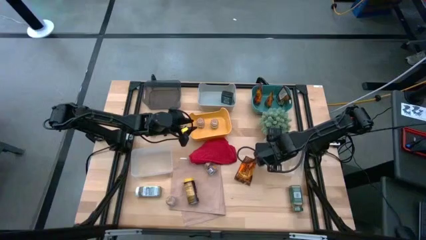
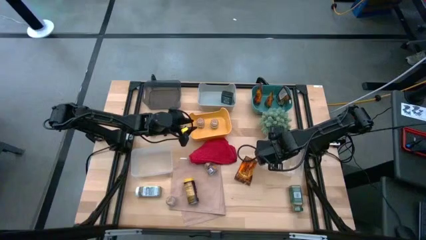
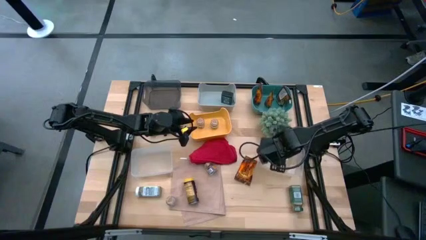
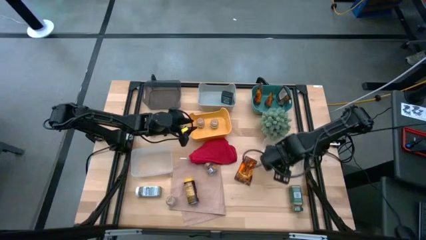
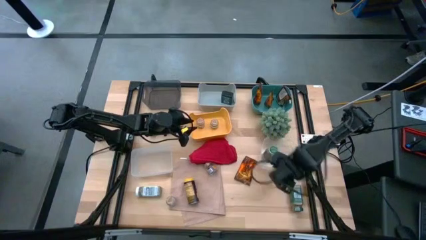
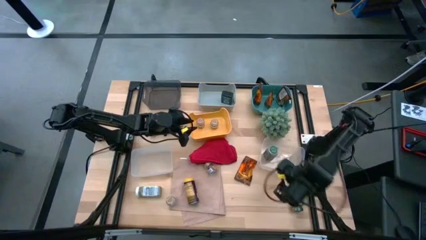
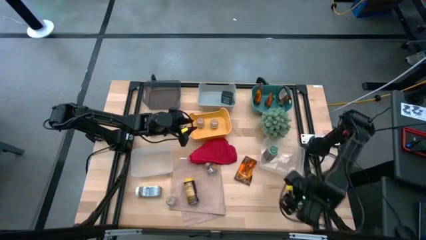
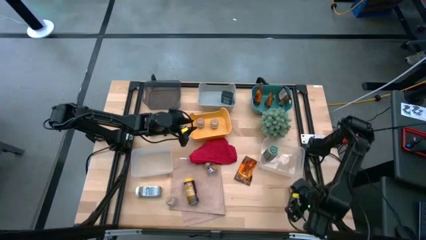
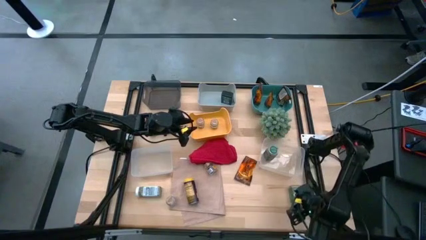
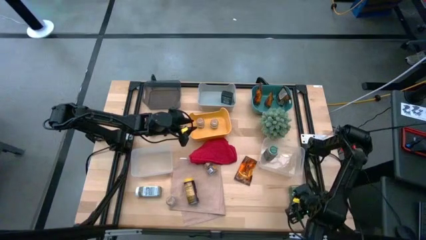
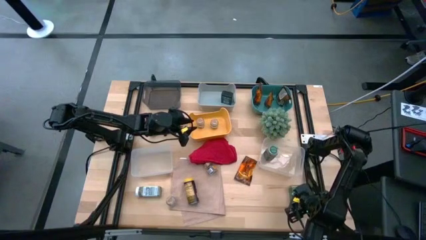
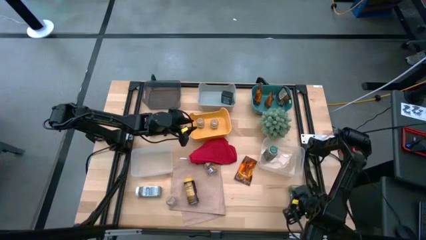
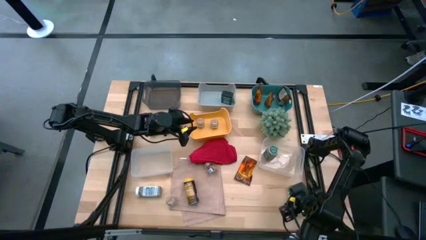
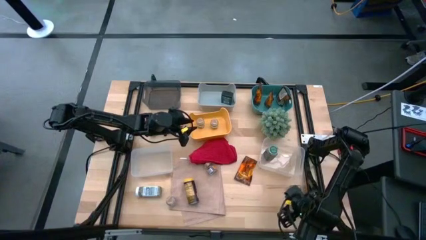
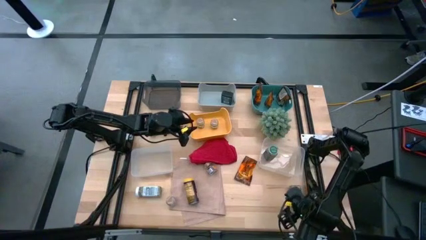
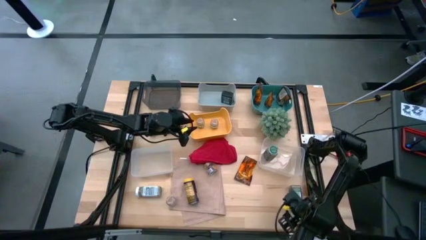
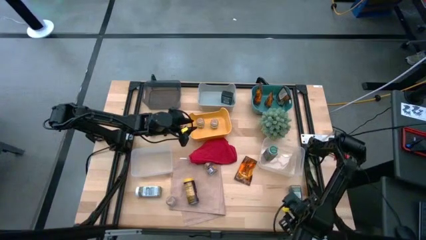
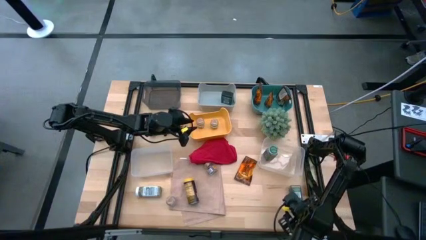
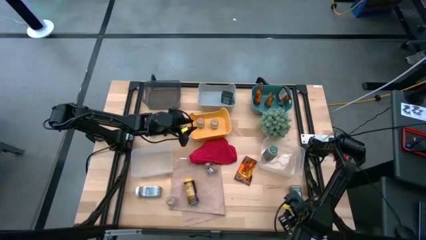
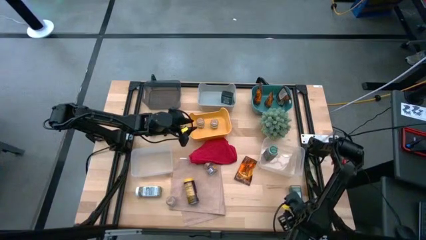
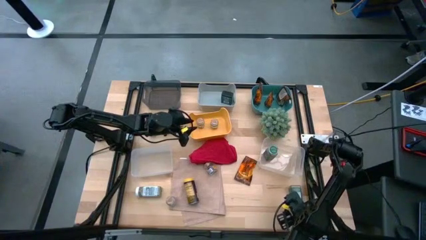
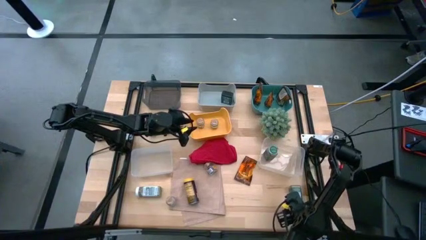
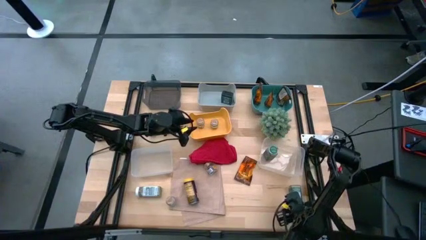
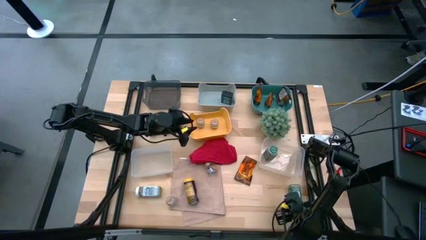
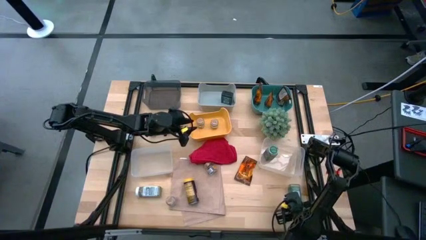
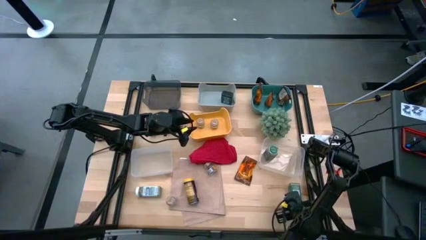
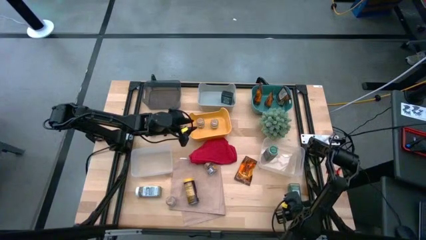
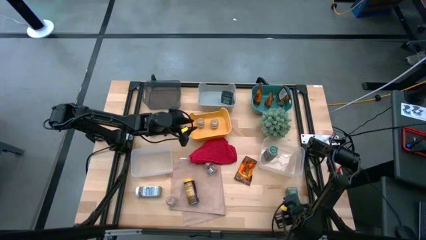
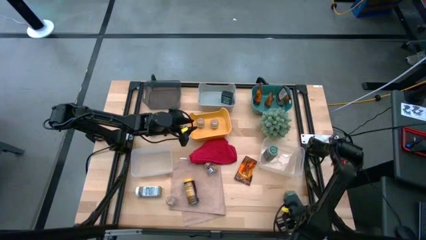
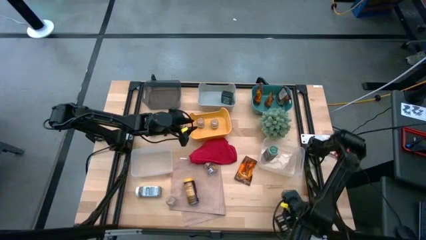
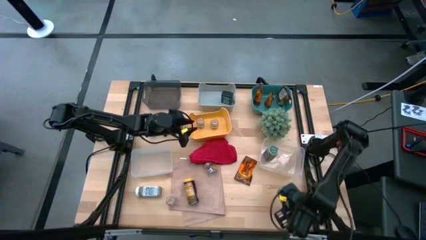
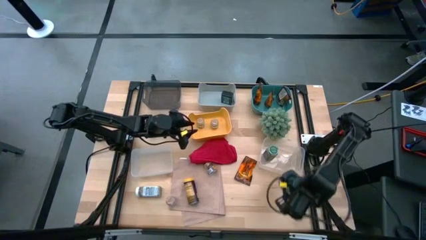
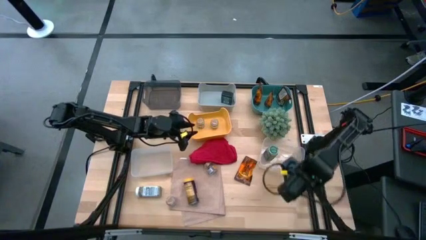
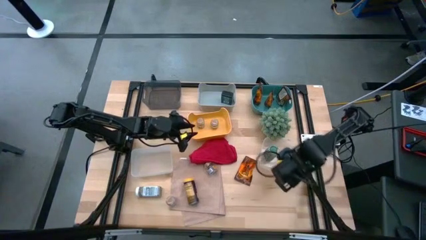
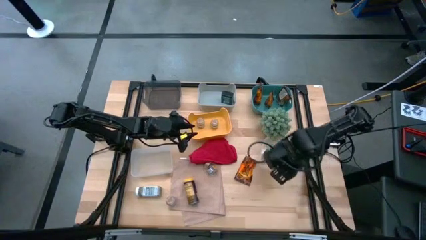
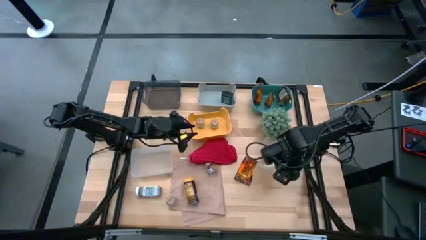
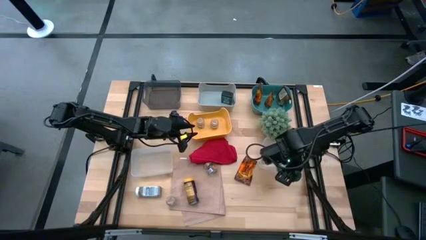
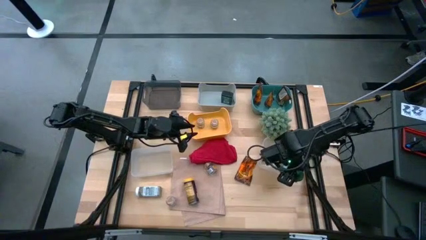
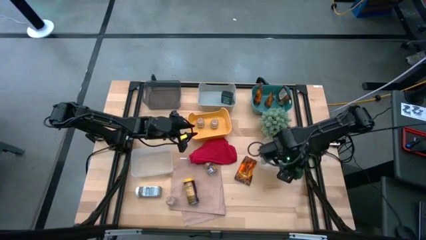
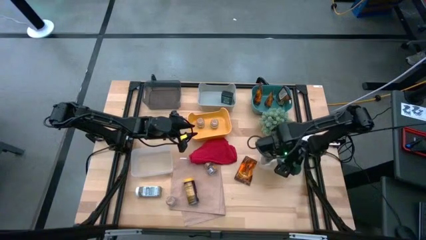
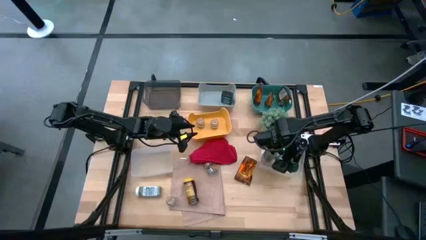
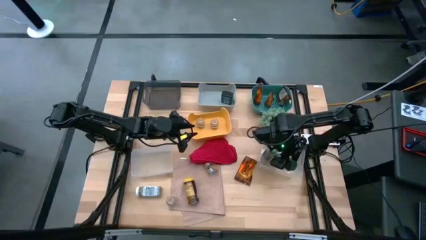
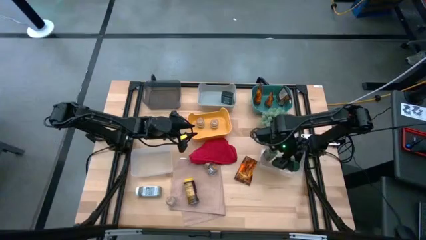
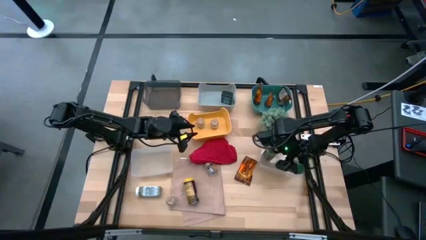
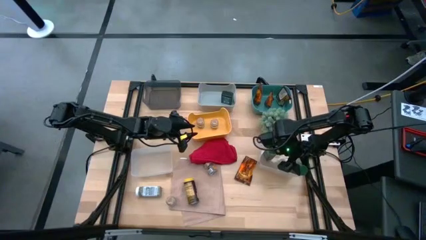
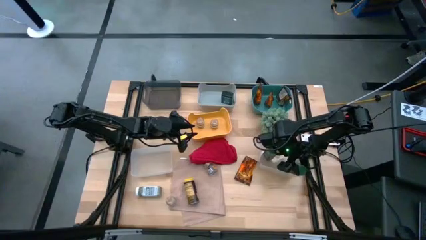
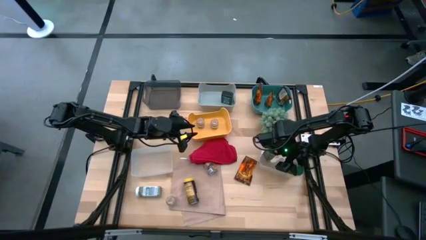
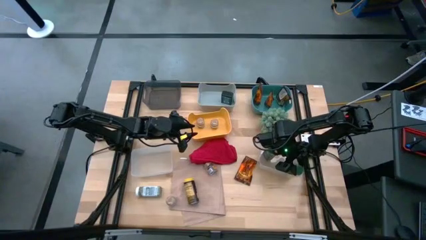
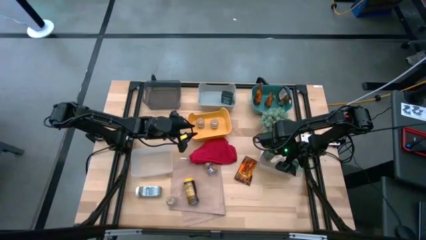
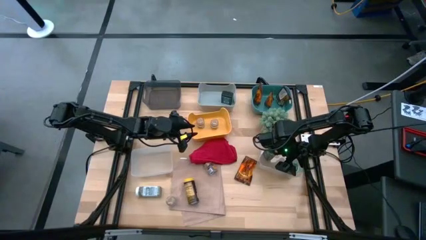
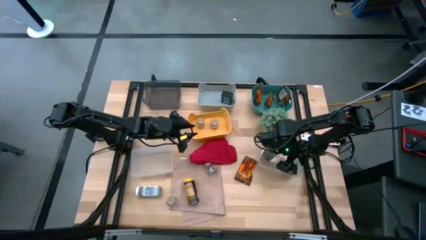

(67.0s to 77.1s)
Task: Sort spices by type
Put the green seasoning bottle into the right transparent bin
